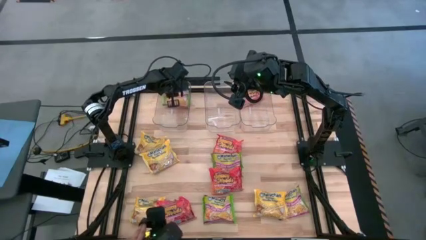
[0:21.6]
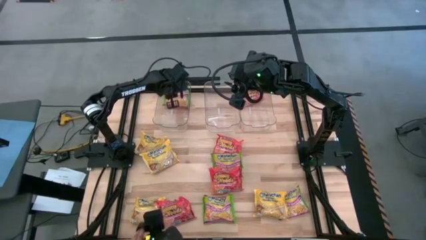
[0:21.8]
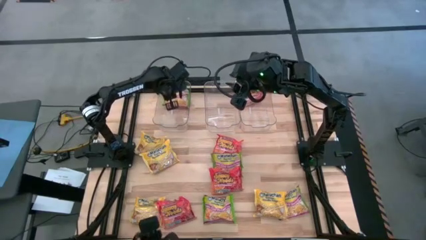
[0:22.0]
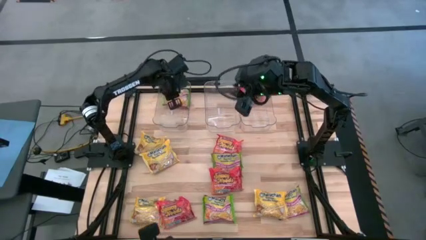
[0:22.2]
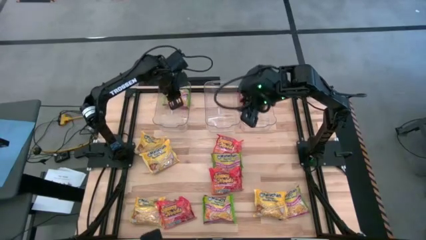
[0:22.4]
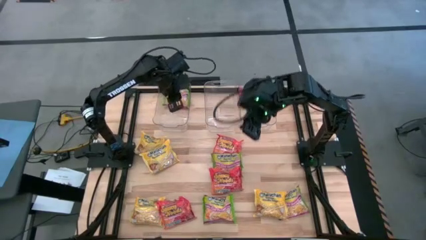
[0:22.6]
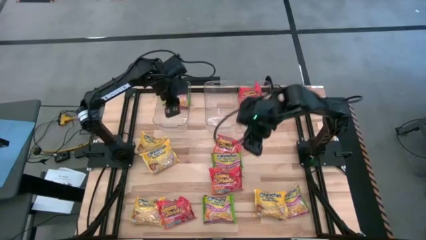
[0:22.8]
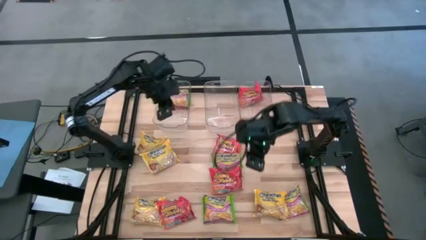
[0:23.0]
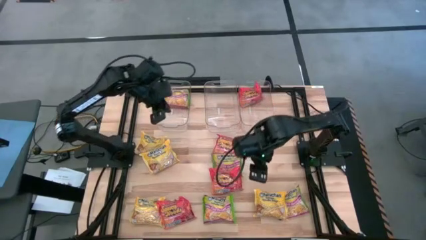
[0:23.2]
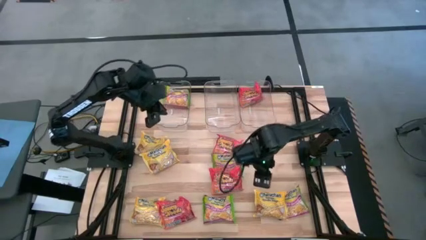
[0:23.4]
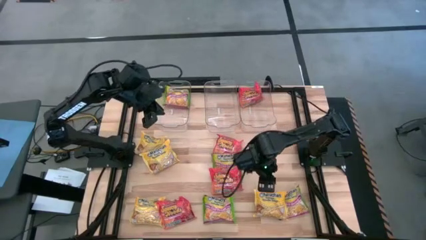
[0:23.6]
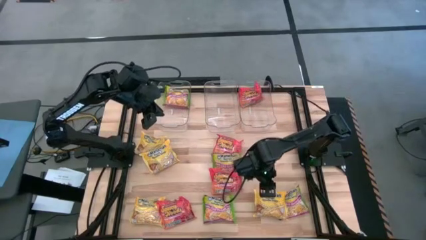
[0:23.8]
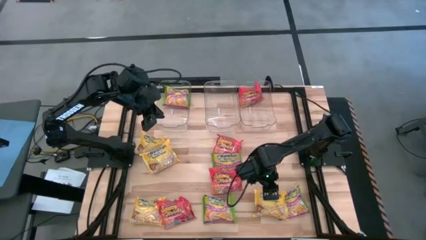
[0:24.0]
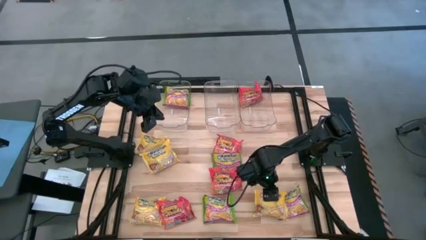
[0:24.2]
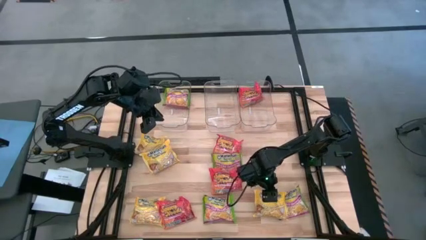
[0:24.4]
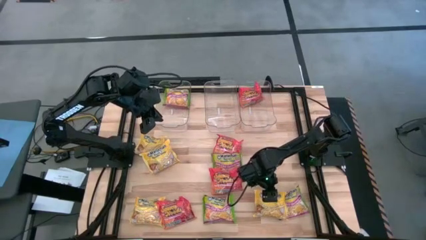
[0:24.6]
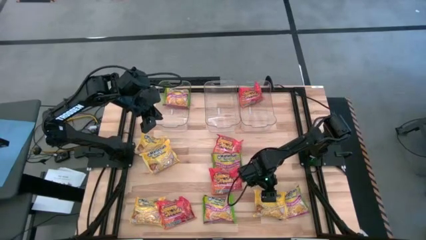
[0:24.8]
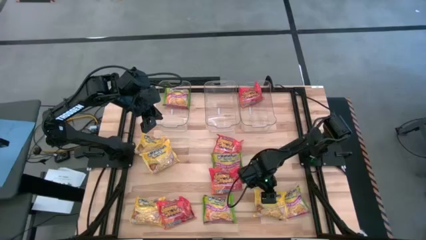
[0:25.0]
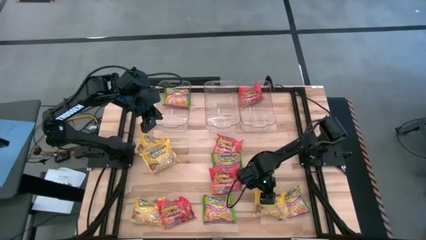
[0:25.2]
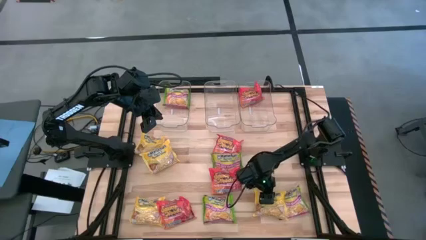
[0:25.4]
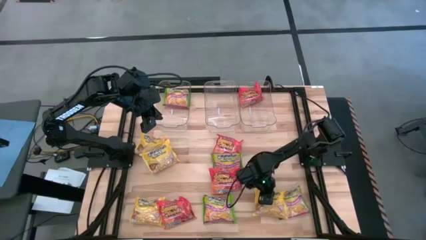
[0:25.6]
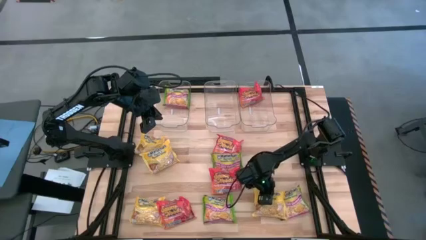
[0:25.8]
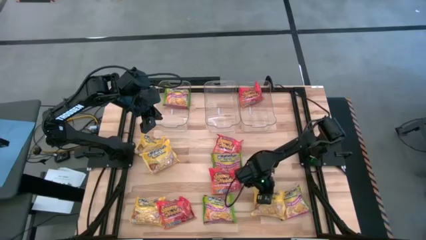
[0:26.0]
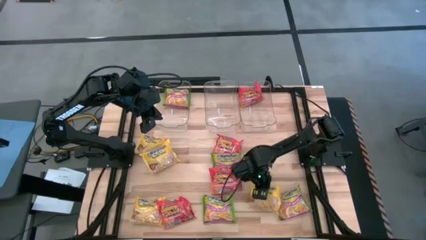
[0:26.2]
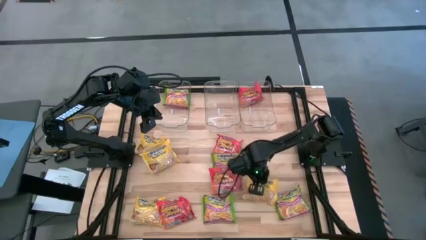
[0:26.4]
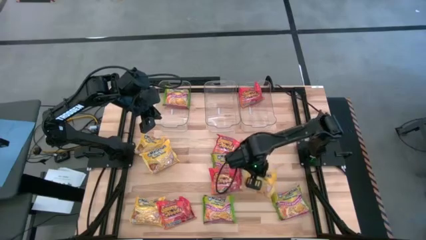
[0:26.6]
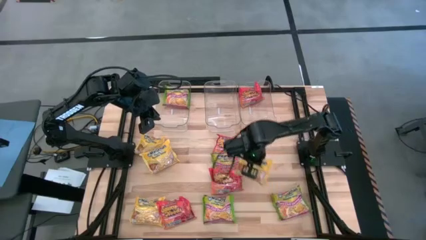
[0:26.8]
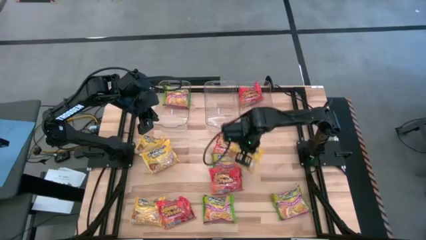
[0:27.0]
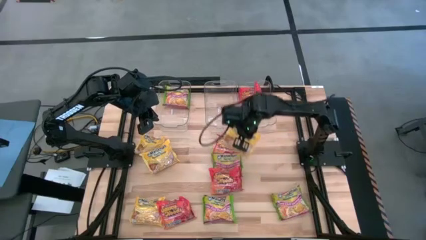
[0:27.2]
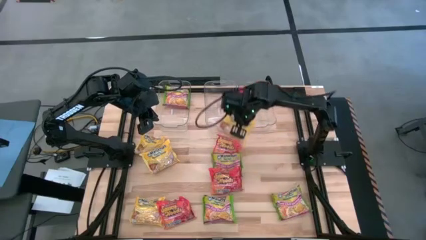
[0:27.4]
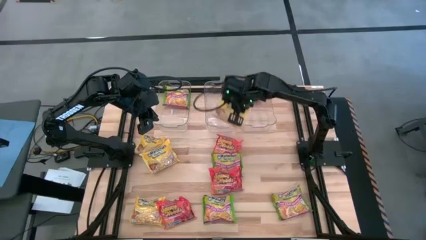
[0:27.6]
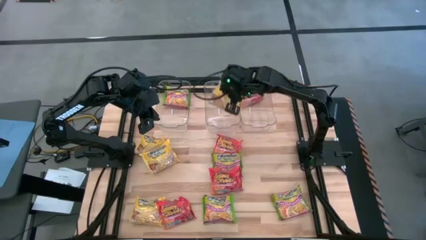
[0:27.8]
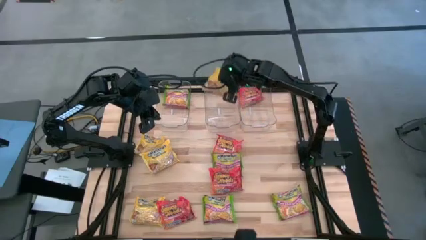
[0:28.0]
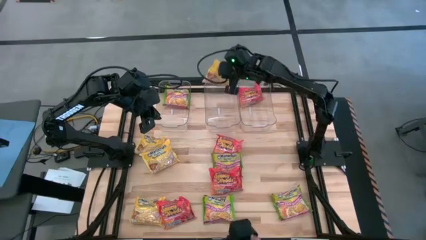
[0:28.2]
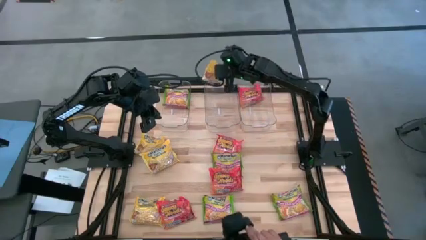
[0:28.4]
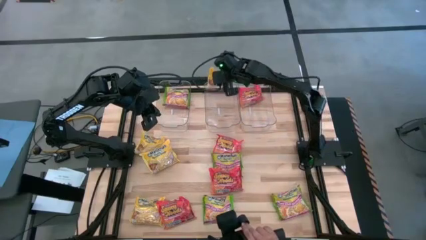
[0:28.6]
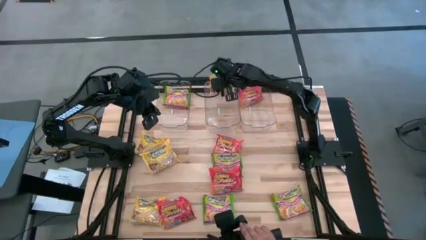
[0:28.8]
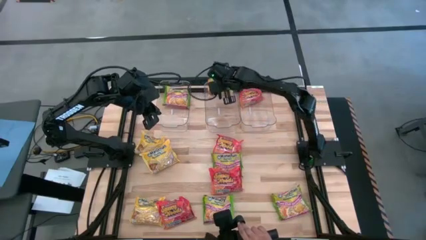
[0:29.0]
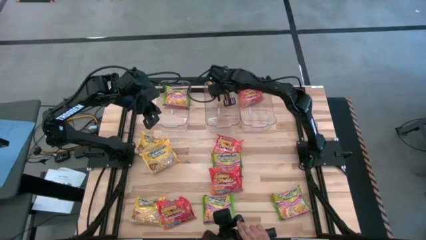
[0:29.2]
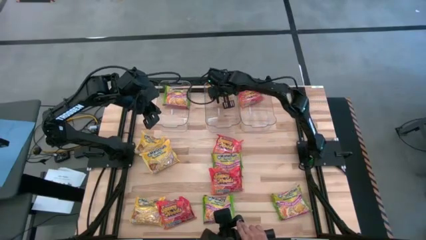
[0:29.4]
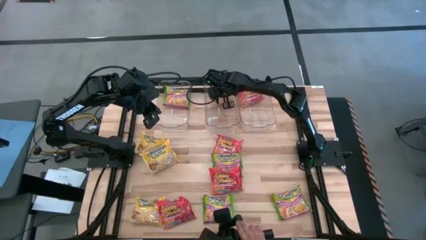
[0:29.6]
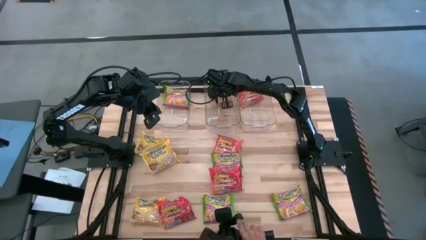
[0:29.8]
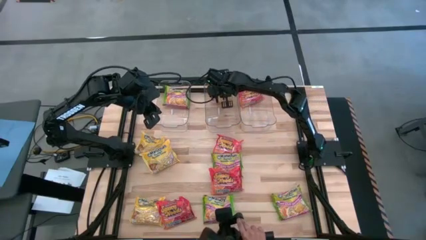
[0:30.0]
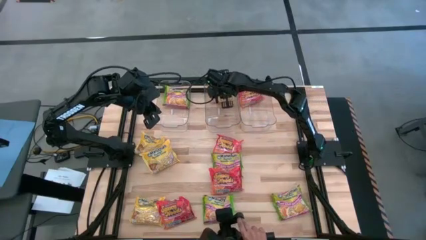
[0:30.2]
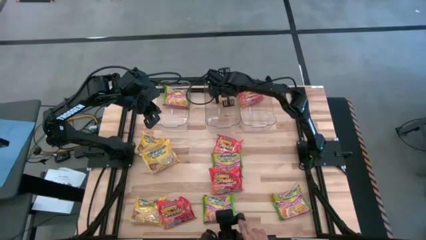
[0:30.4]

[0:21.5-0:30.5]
Task: Sort Maruchan noodles
Put the yellow noodle pack into the middle transparent bin

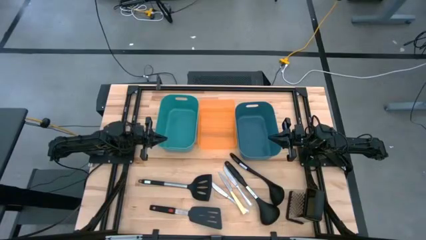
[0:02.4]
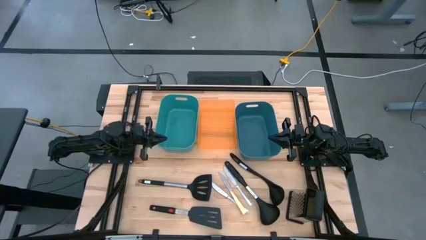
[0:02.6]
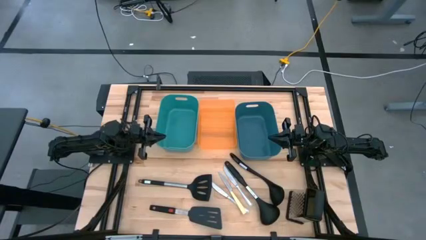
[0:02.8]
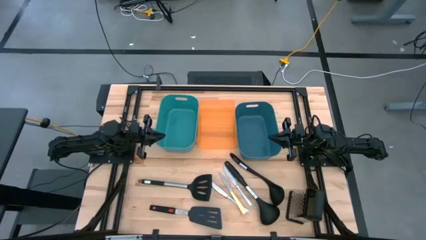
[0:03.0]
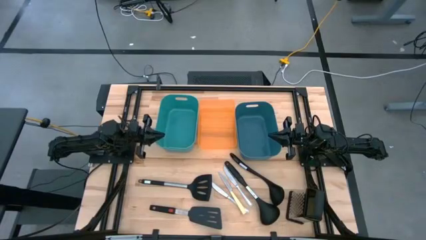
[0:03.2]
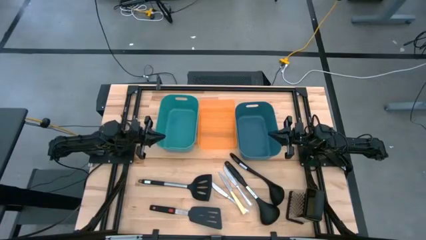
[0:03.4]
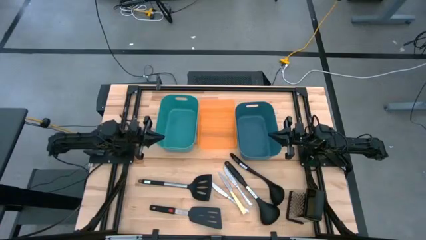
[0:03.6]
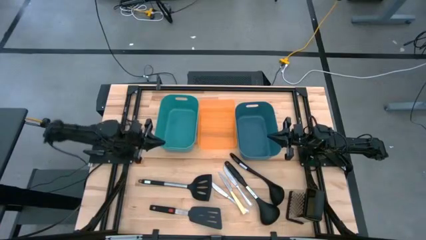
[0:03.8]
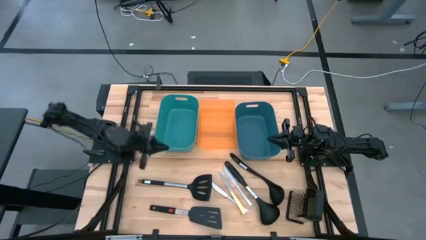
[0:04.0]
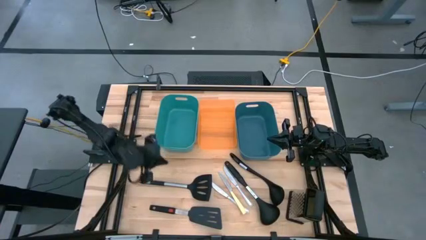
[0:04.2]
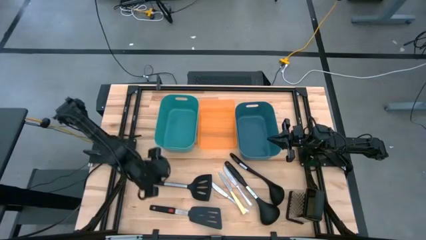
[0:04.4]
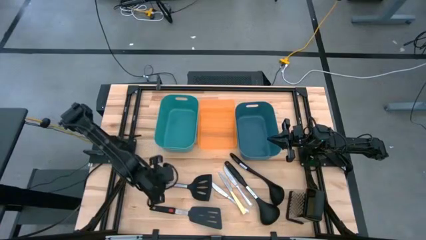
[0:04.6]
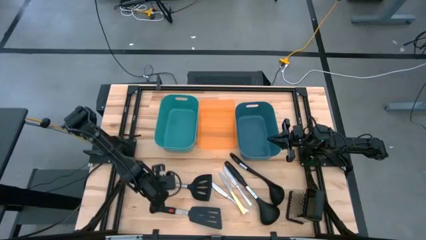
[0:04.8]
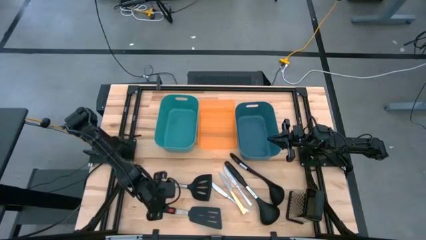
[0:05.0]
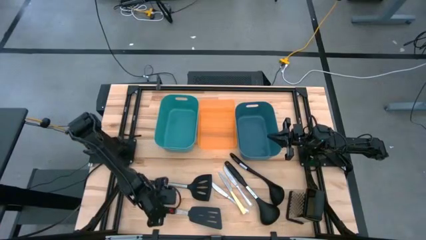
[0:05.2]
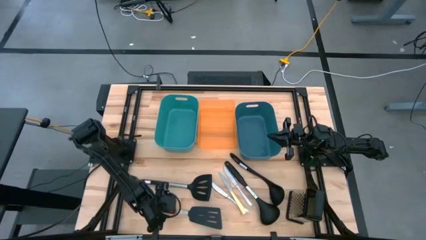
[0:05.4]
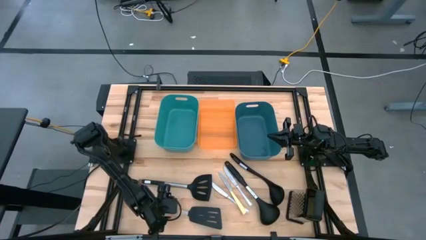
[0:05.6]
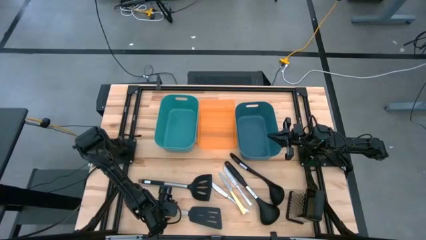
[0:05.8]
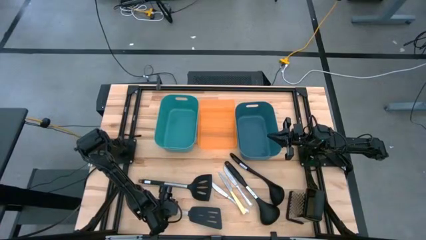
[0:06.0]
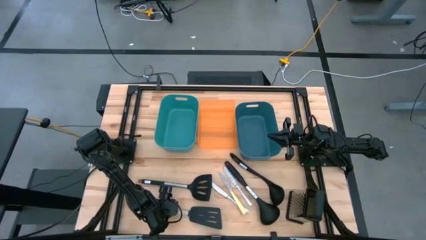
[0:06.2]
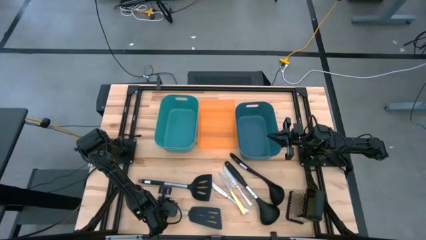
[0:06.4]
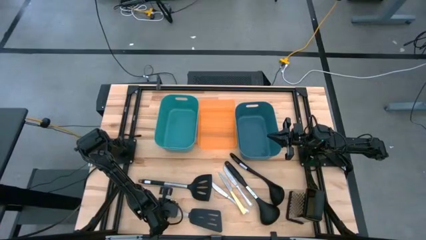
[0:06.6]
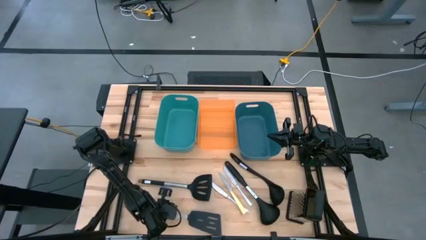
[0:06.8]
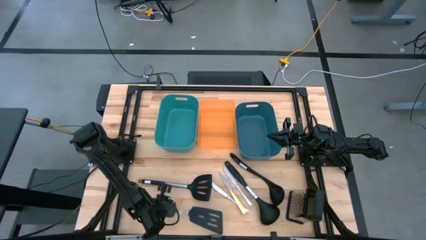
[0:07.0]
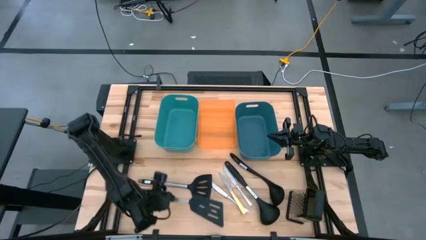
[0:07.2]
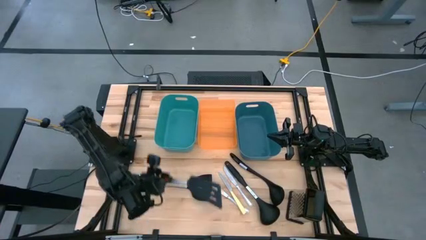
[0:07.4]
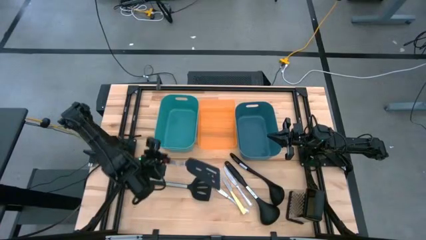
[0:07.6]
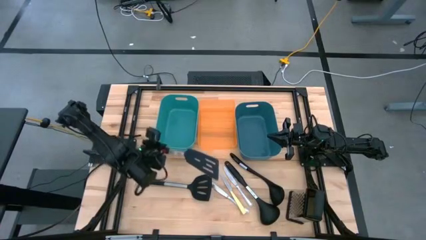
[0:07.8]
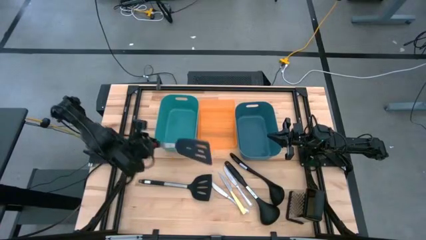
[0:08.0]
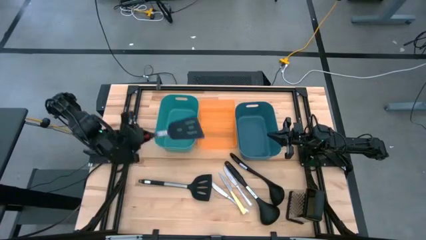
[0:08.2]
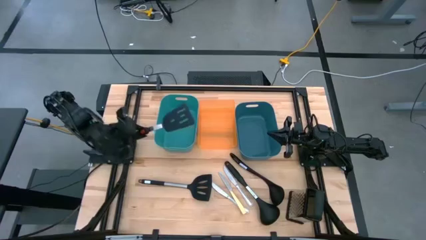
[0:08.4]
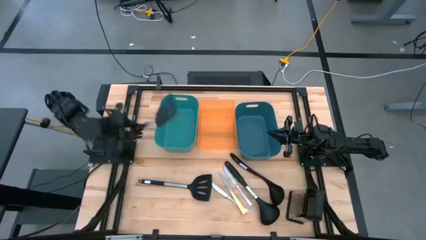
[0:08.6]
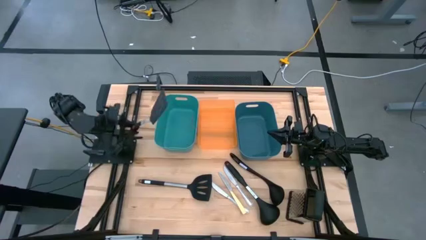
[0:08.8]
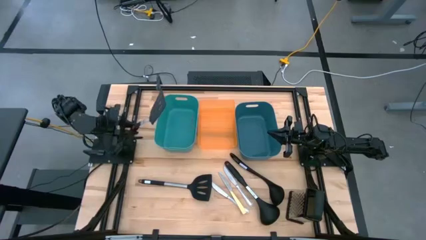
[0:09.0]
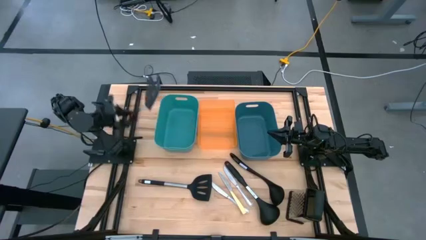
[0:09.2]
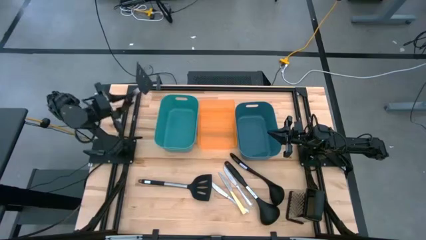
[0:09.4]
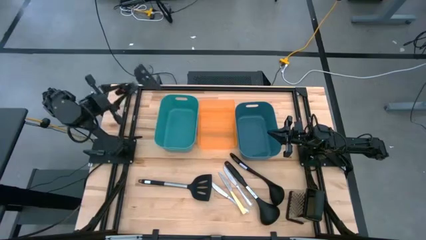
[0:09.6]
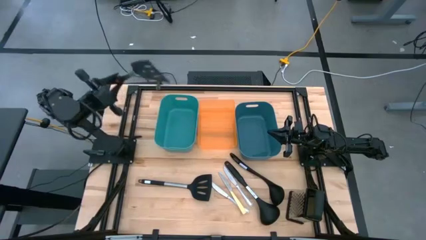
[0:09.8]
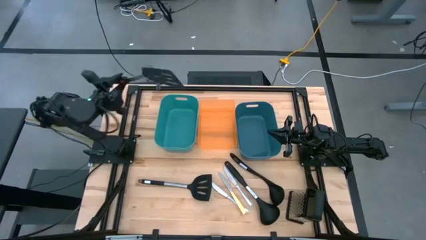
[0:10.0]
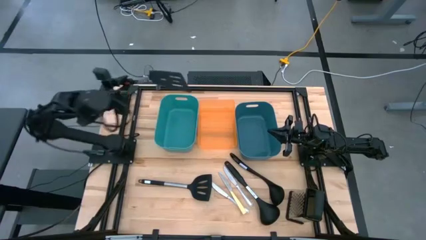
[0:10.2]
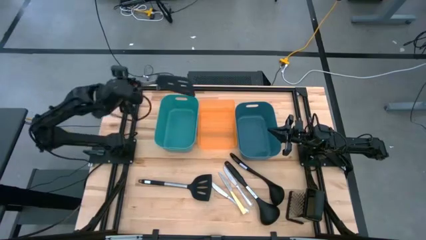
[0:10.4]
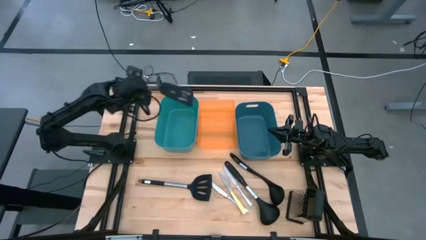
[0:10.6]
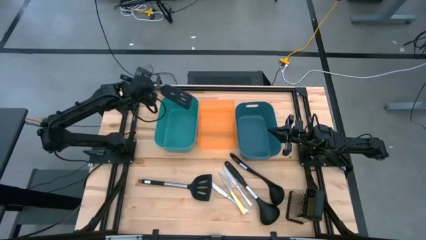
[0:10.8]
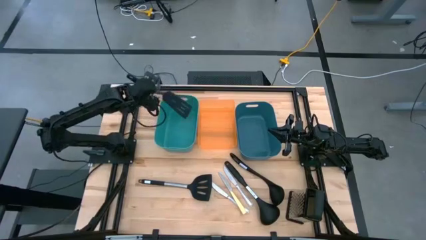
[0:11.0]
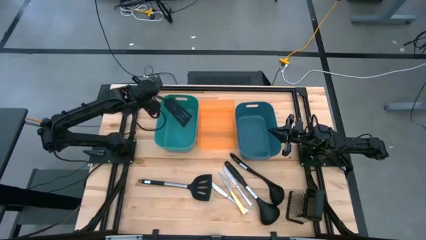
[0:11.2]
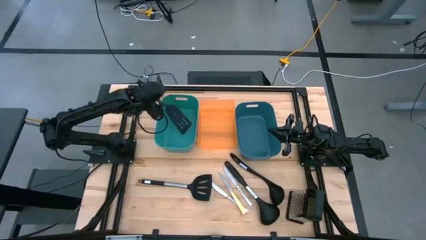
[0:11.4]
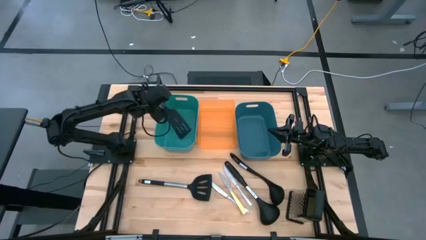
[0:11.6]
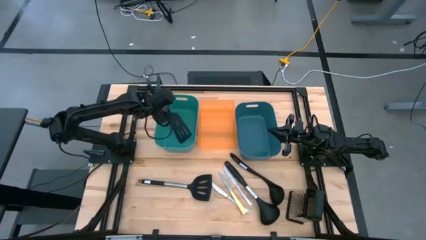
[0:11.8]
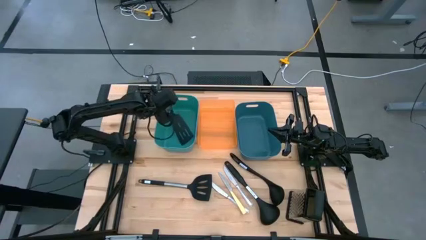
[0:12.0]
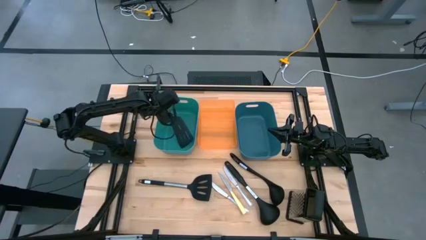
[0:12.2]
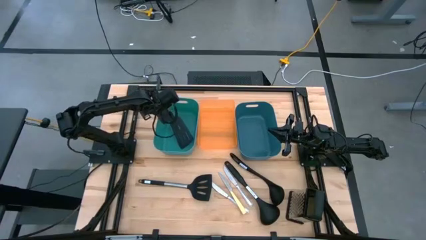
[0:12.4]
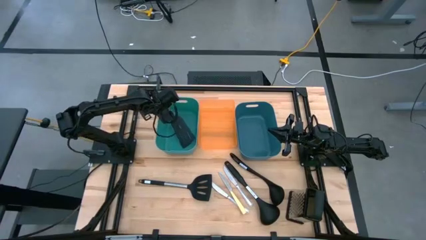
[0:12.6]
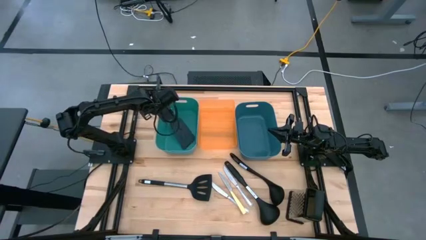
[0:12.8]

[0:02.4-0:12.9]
Task: Pick & Place Kitchen Items
Put the bottom black spatula into the light green bin
